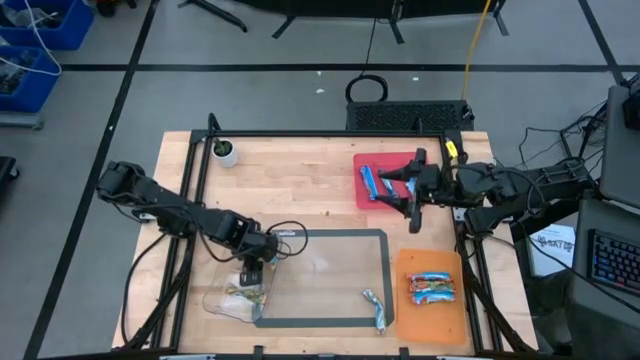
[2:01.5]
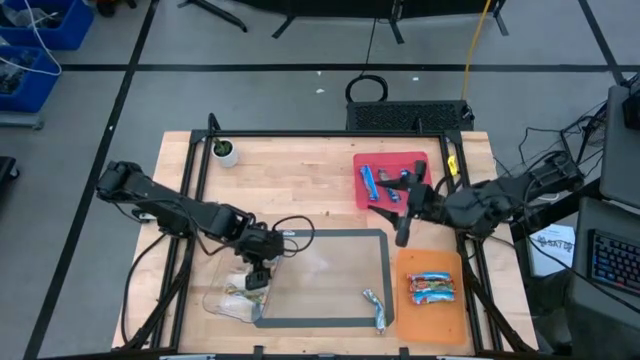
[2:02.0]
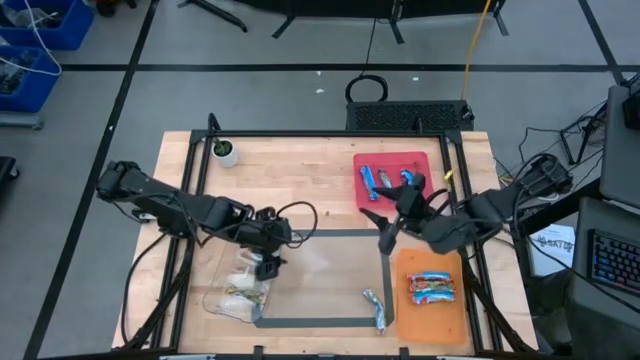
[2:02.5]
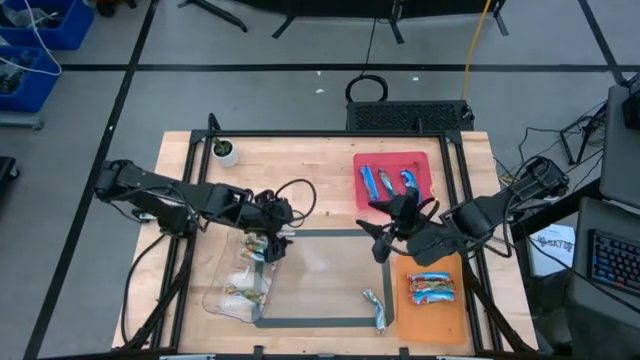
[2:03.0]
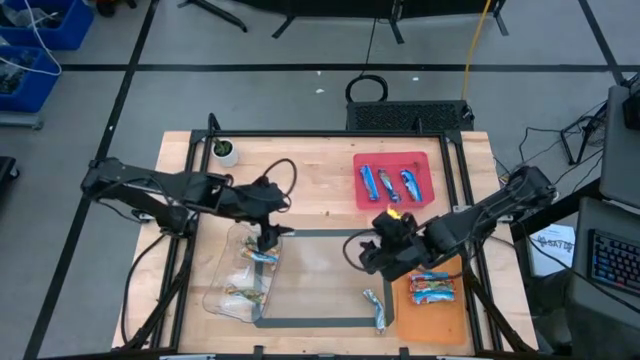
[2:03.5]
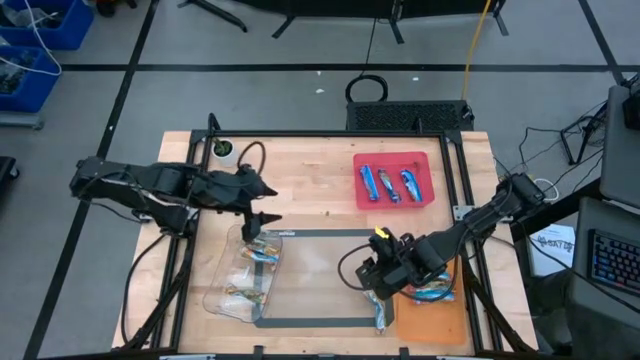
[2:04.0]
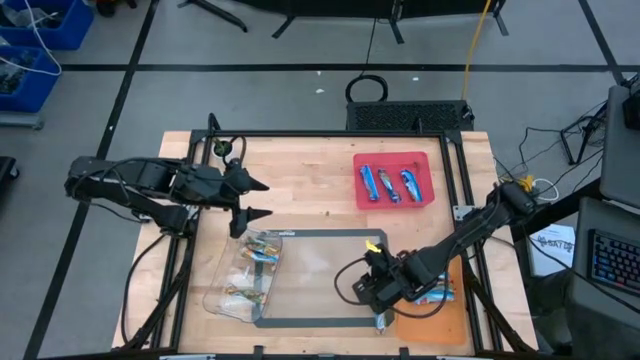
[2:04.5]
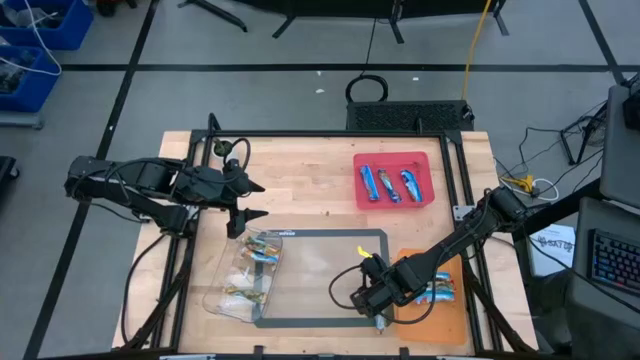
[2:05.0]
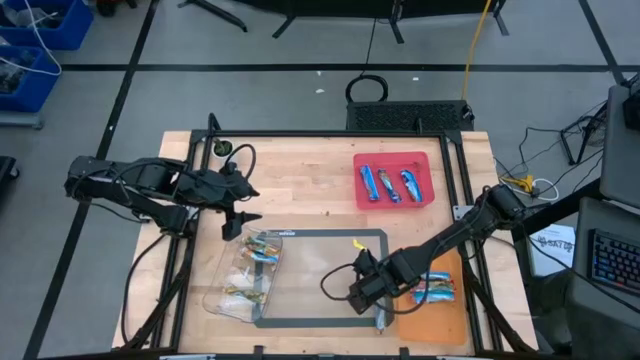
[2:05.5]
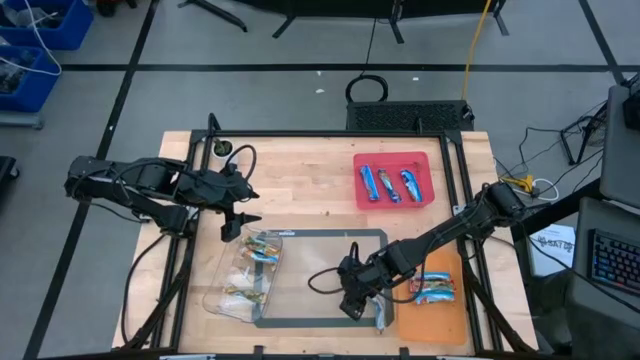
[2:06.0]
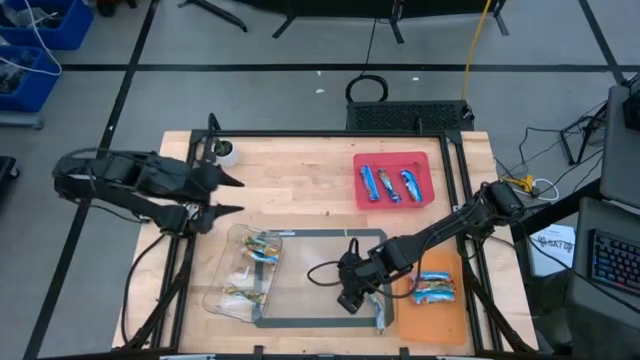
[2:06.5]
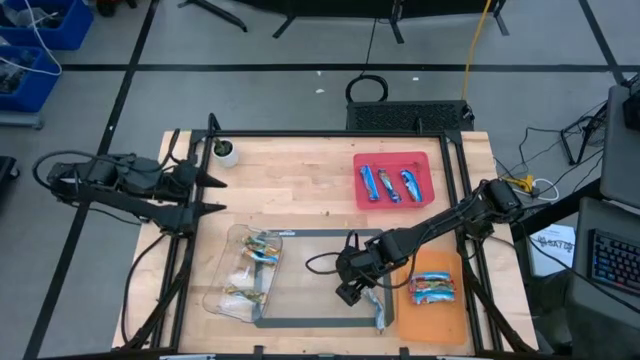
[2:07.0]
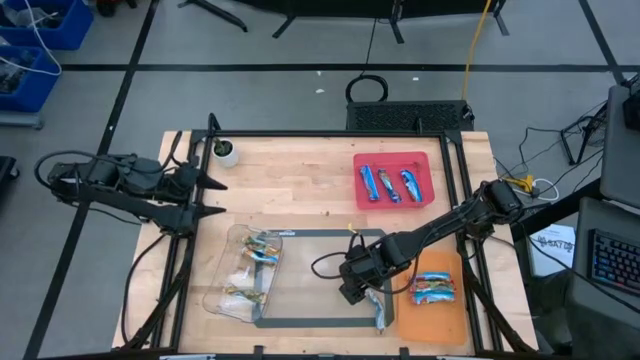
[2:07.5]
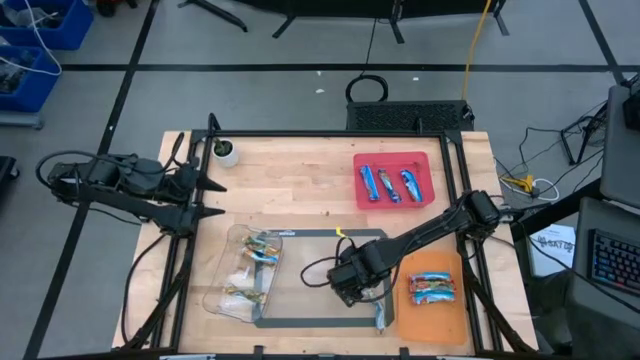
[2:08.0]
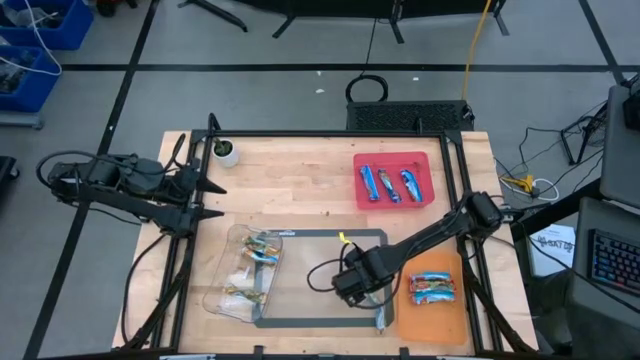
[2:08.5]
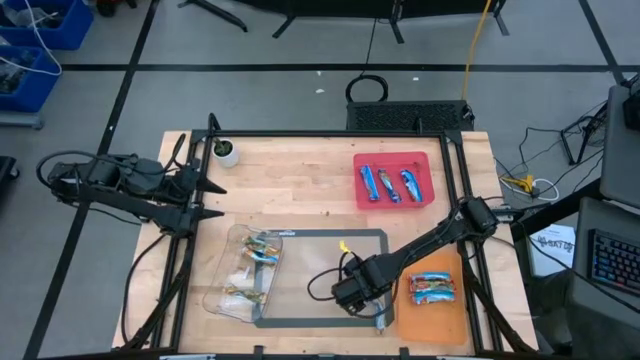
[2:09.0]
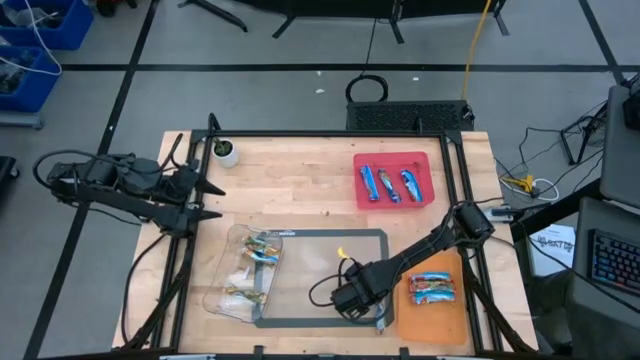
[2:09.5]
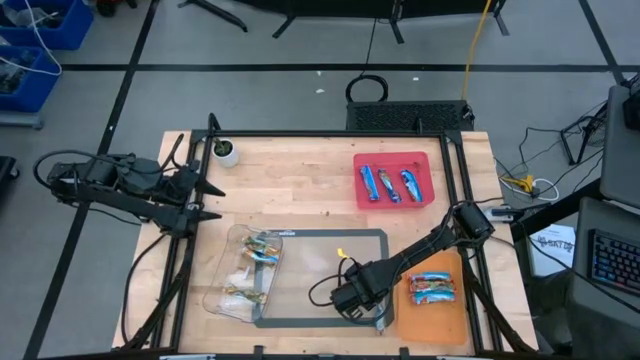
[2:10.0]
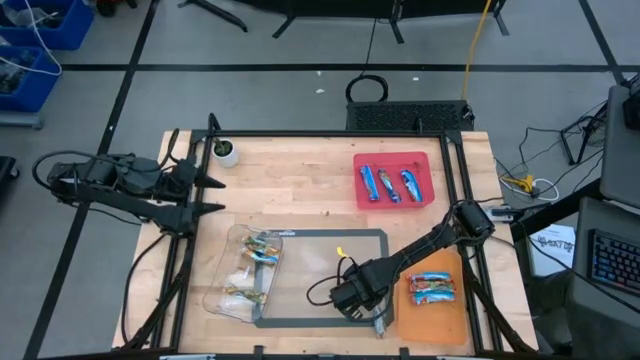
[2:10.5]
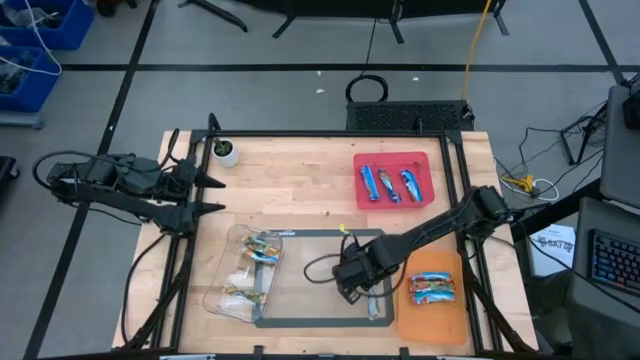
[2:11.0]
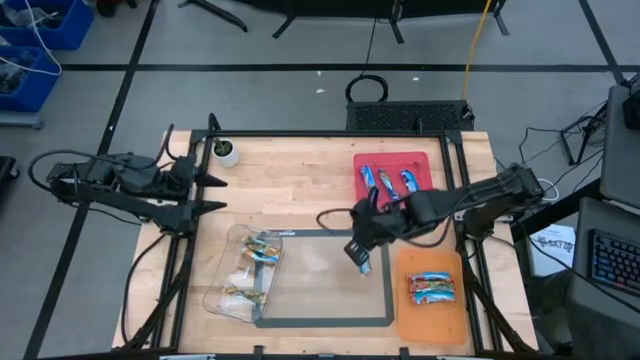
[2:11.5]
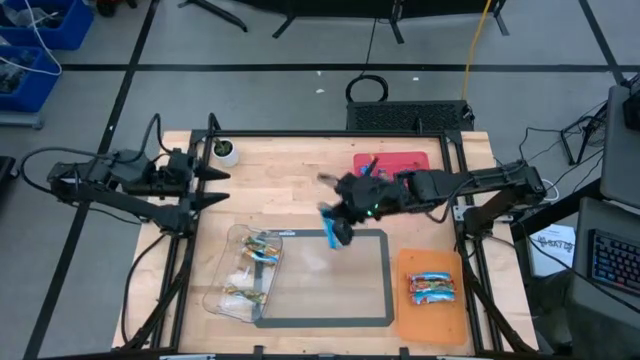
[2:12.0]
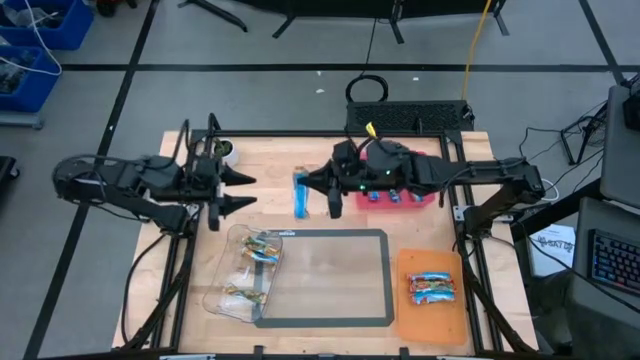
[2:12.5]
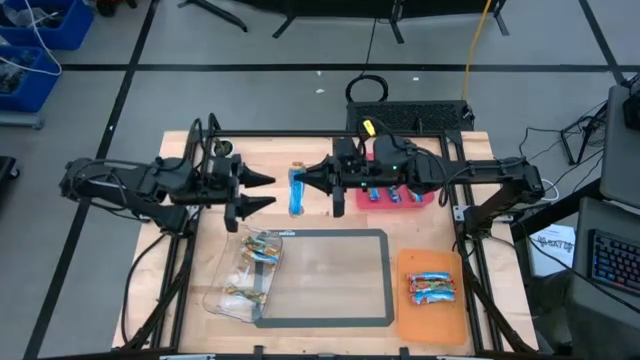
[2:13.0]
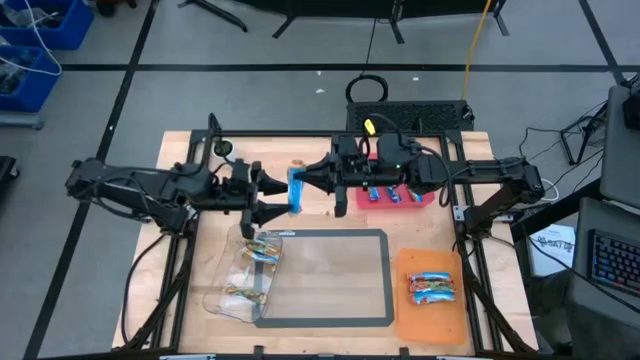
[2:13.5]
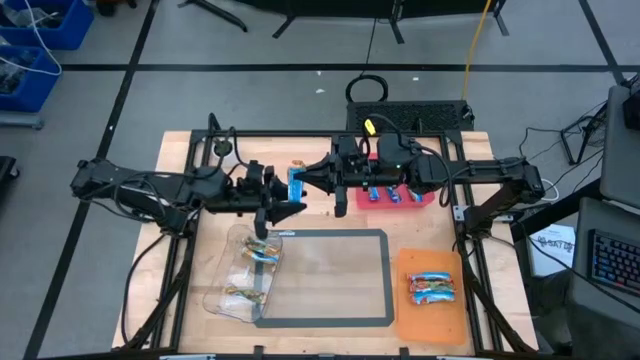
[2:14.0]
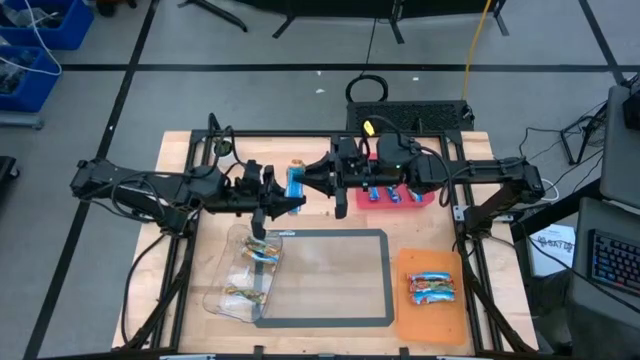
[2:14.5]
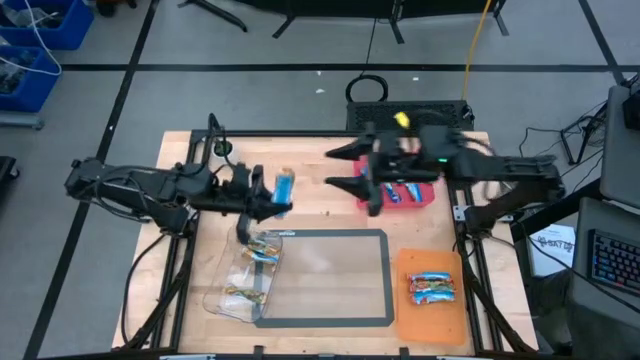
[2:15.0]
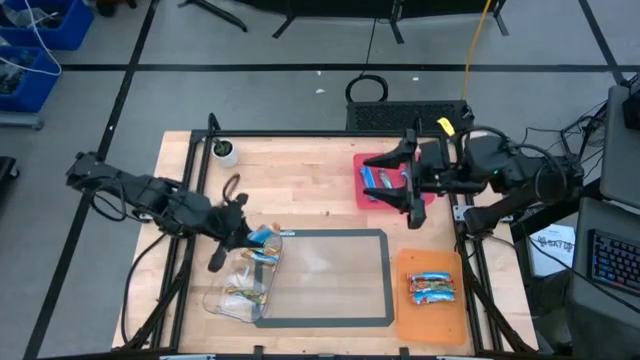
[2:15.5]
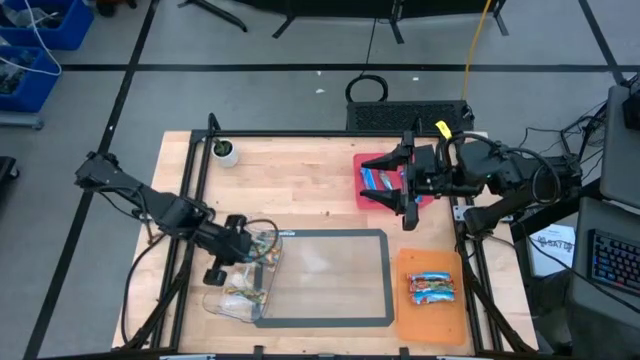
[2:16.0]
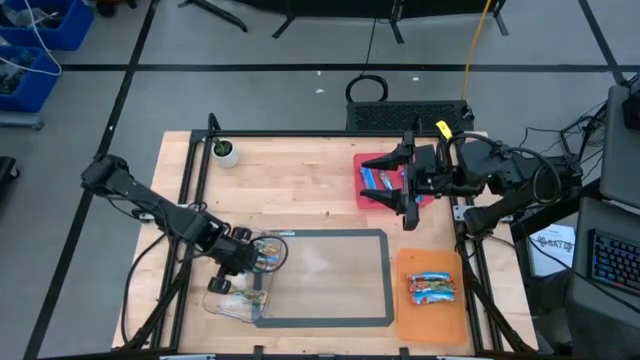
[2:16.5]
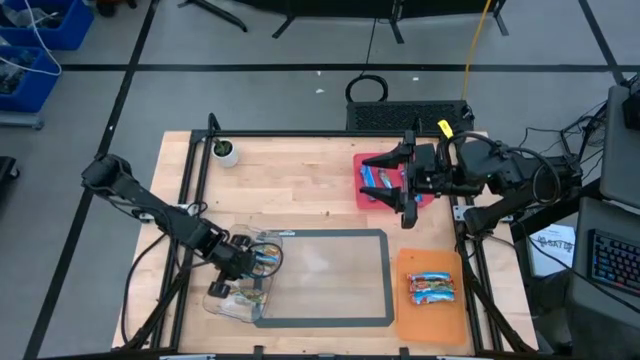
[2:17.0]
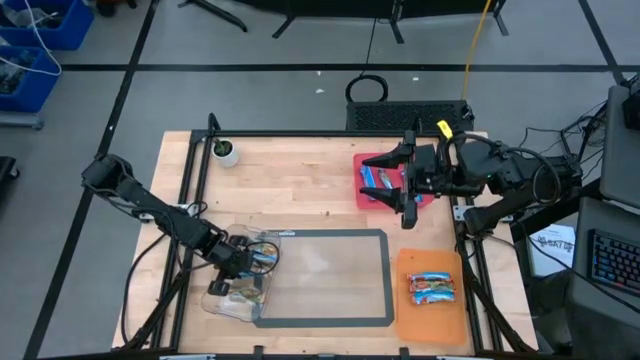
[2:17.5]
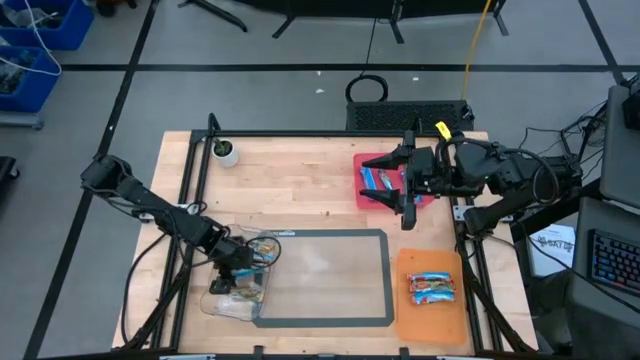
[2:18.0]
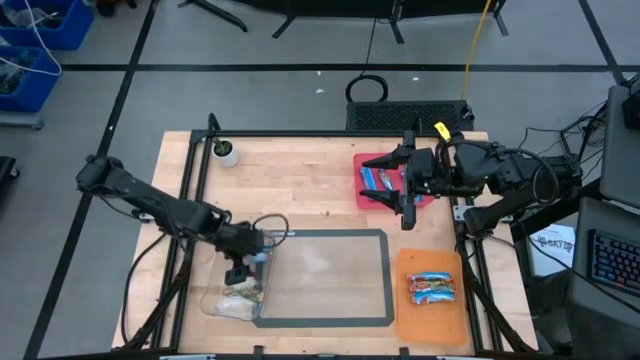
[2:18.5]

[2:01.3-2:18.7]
Task: Pick and place Granola Bars by type
Put the yellow granola bar into the transparent bin

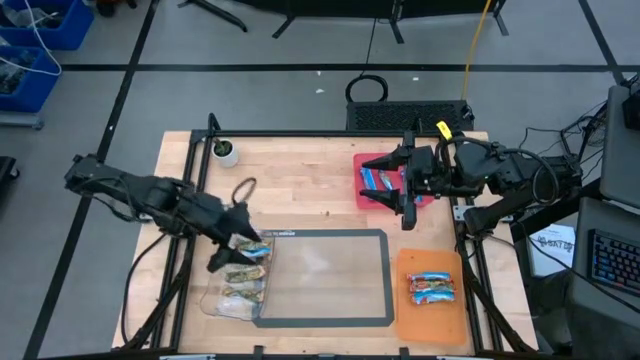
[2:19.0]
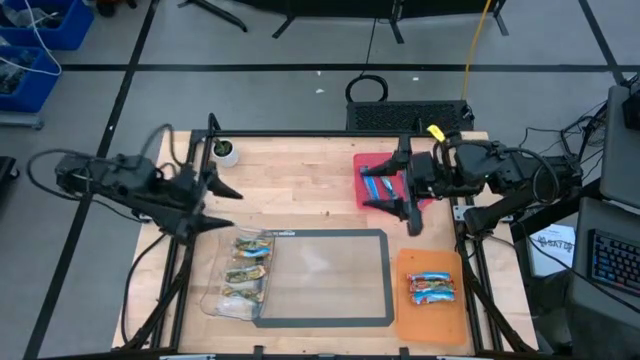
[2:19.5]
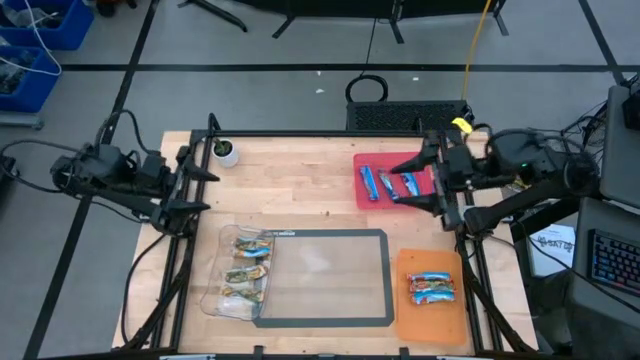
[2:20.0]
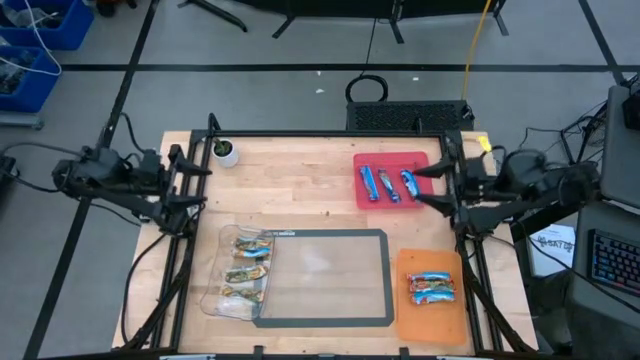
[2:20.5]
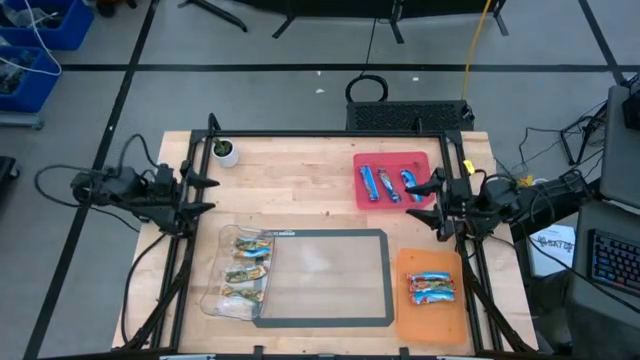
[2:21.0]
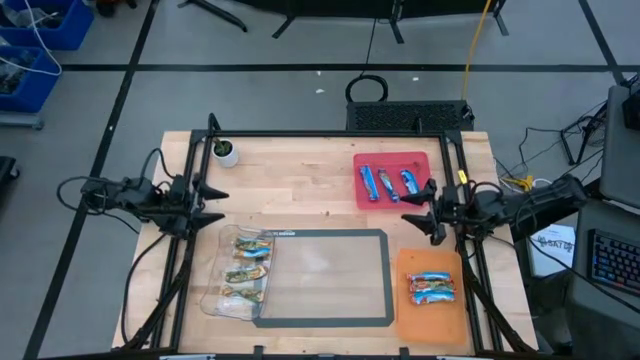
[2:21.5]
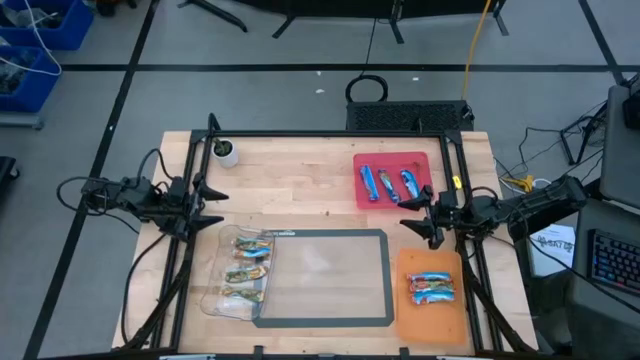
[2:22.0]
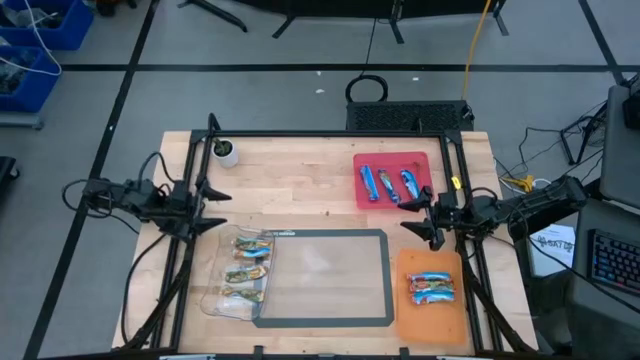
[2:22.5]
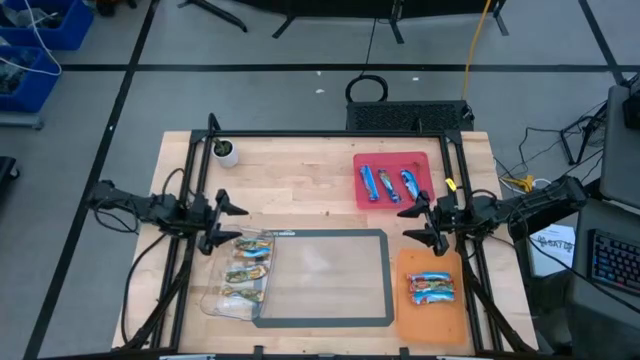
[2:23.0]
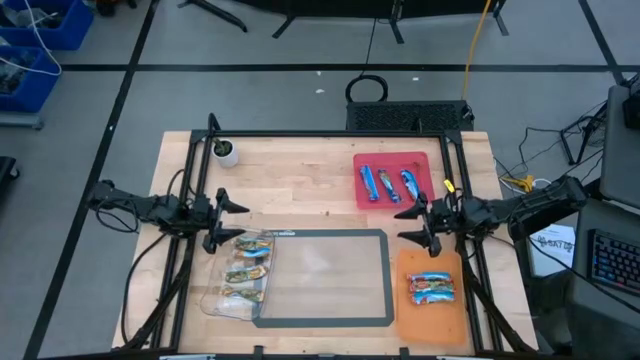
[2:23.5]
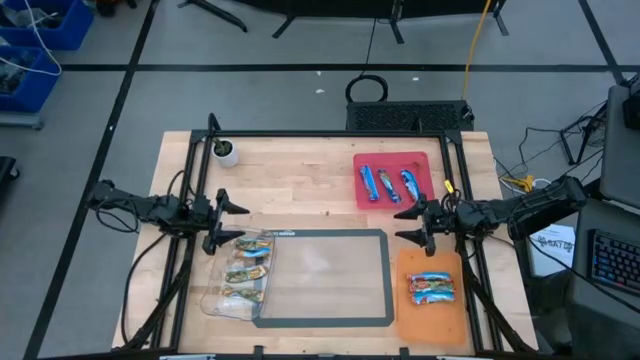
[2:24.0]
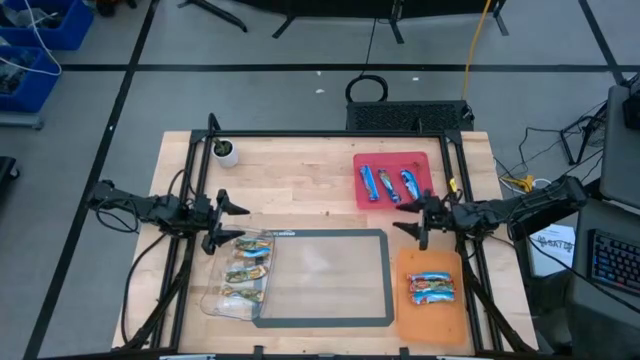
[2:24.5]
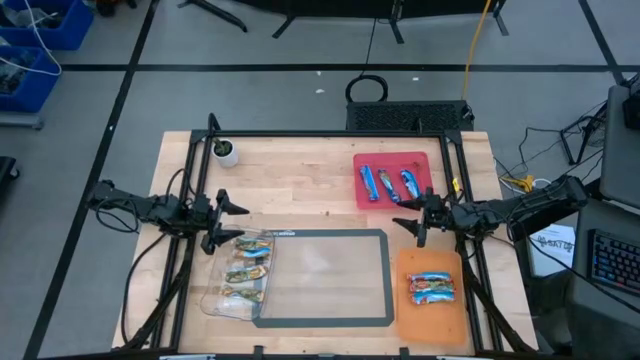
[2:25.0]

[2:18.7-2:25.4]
Return to Home Position
